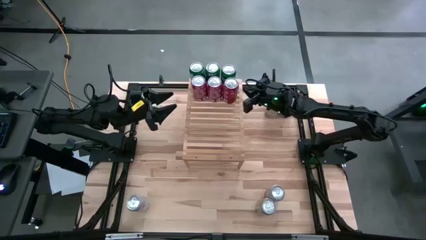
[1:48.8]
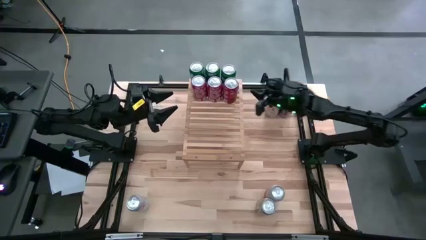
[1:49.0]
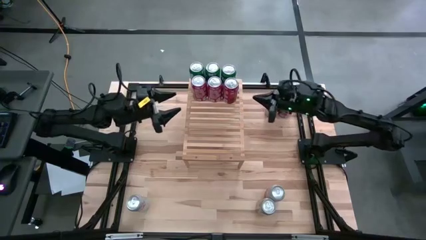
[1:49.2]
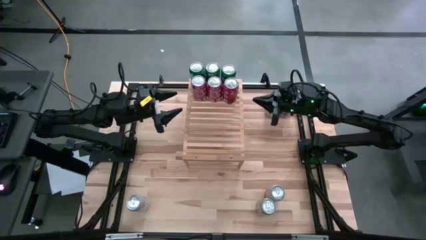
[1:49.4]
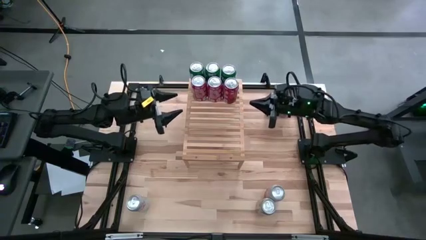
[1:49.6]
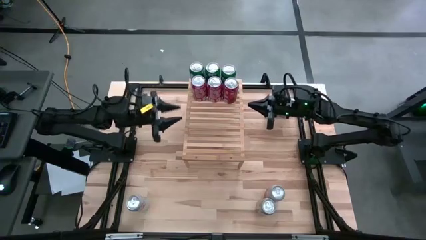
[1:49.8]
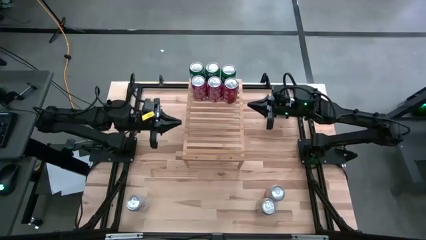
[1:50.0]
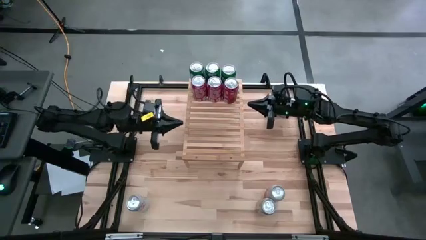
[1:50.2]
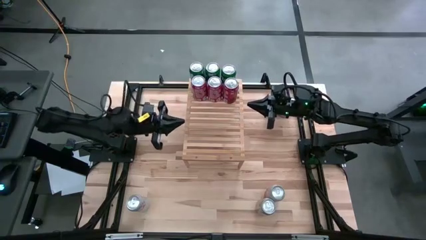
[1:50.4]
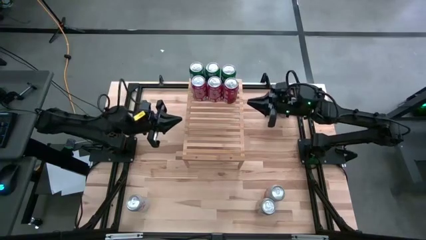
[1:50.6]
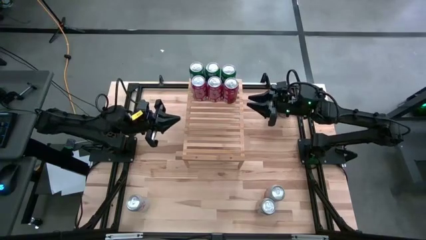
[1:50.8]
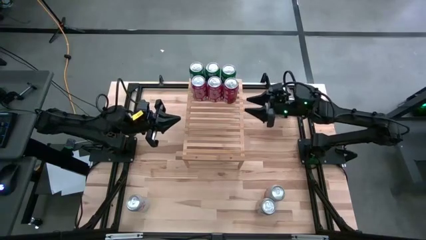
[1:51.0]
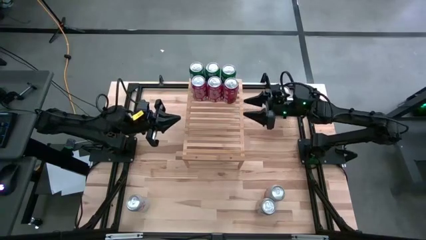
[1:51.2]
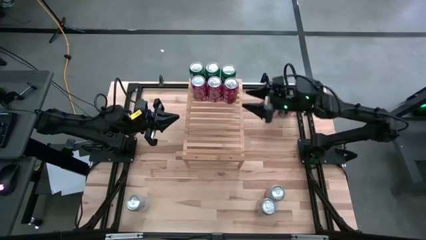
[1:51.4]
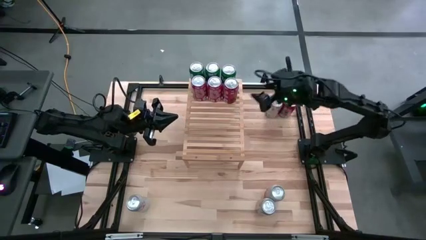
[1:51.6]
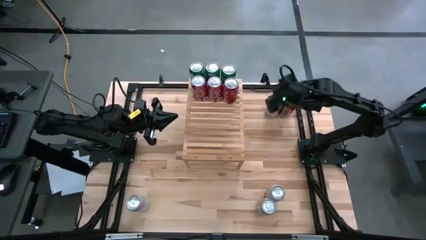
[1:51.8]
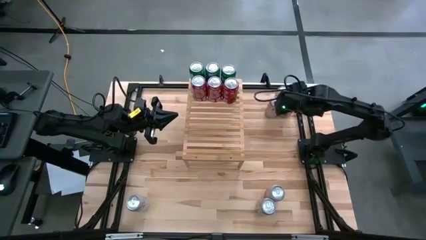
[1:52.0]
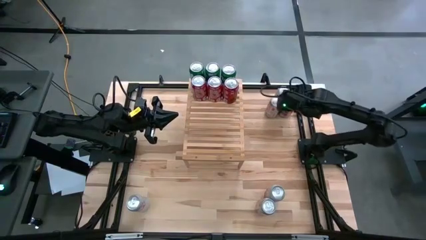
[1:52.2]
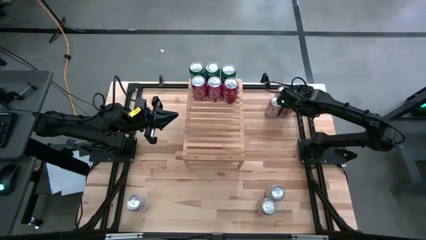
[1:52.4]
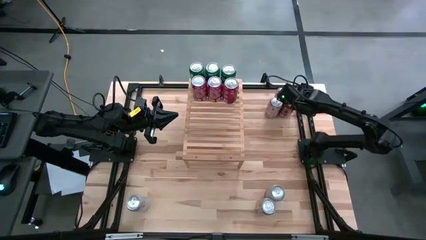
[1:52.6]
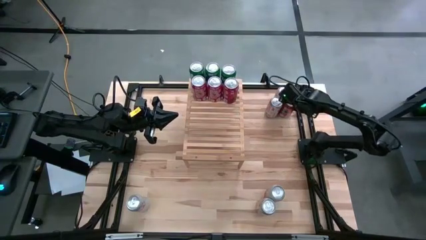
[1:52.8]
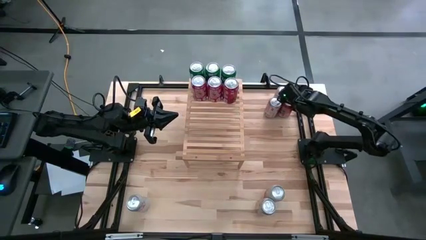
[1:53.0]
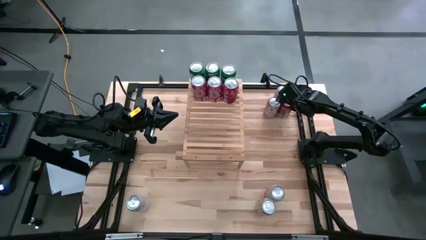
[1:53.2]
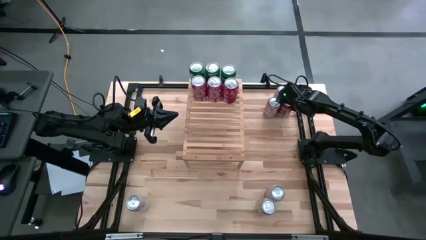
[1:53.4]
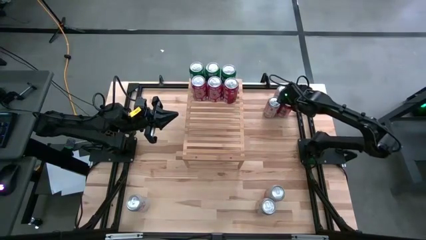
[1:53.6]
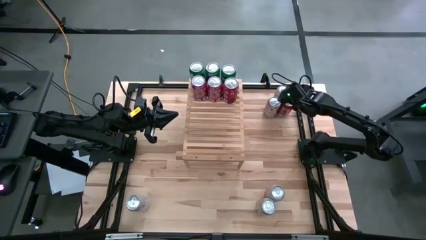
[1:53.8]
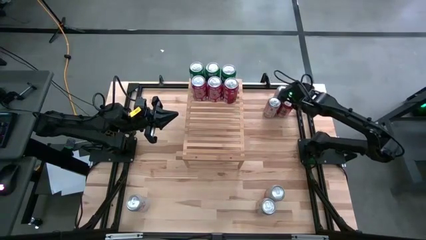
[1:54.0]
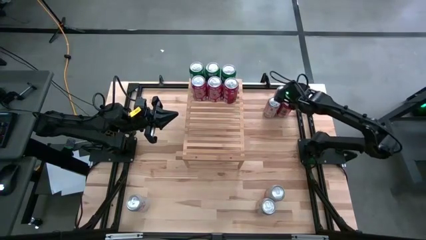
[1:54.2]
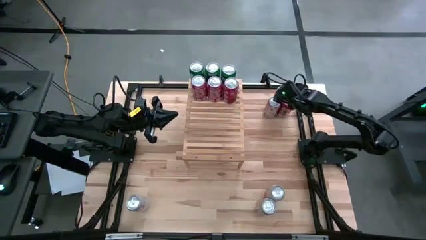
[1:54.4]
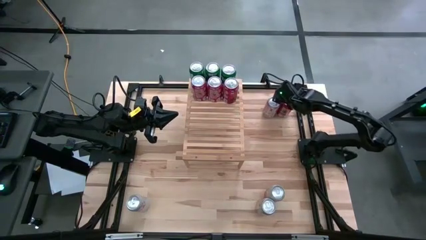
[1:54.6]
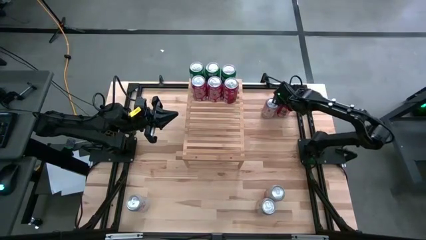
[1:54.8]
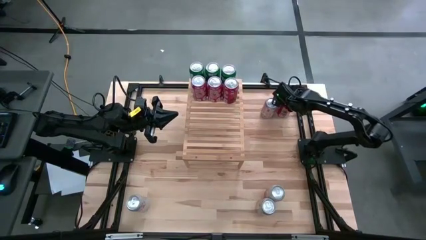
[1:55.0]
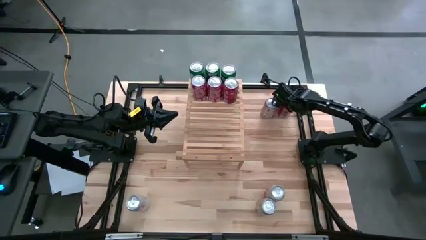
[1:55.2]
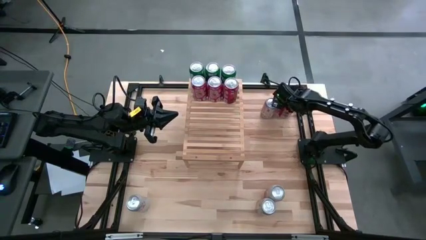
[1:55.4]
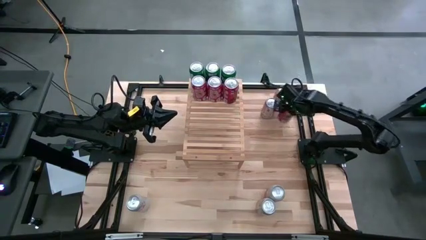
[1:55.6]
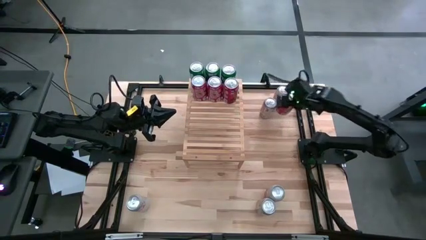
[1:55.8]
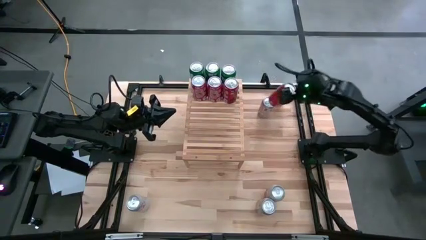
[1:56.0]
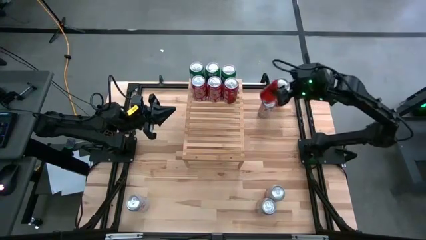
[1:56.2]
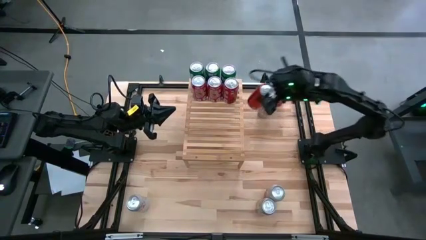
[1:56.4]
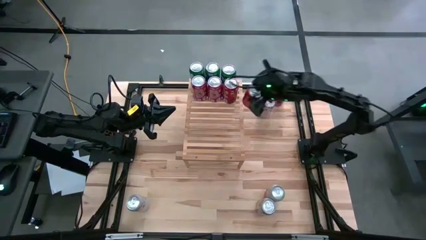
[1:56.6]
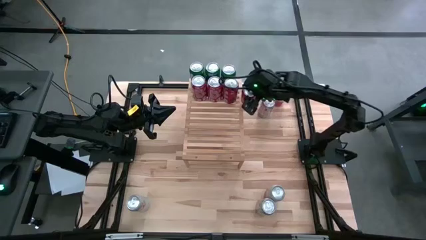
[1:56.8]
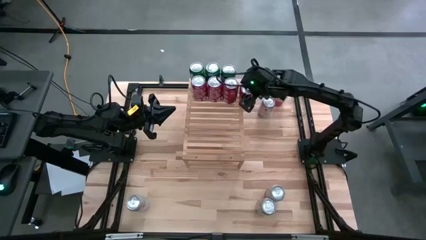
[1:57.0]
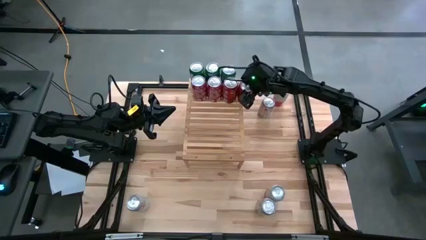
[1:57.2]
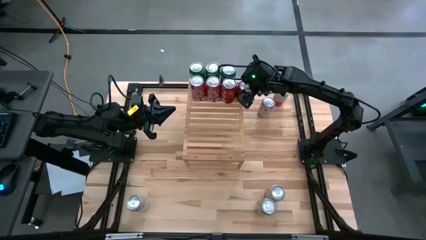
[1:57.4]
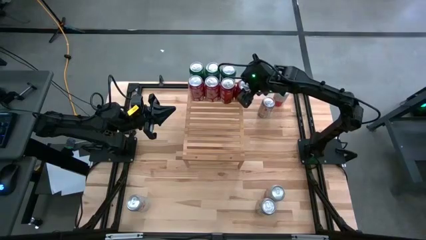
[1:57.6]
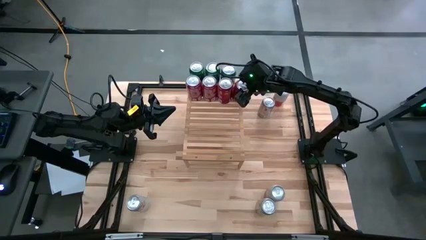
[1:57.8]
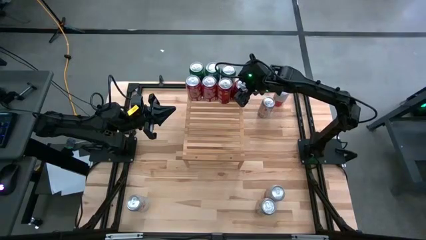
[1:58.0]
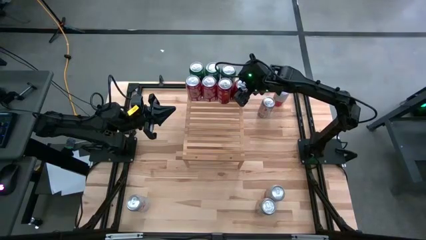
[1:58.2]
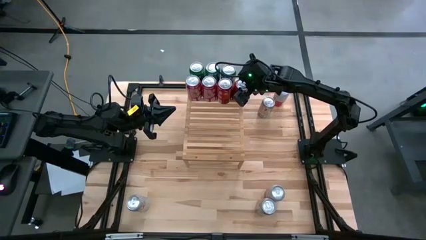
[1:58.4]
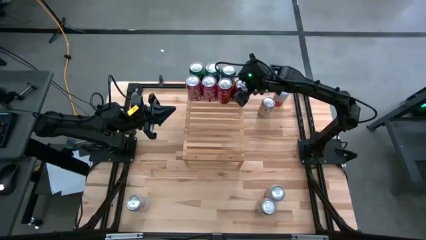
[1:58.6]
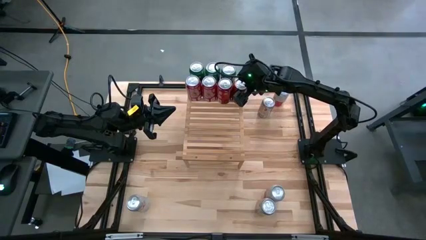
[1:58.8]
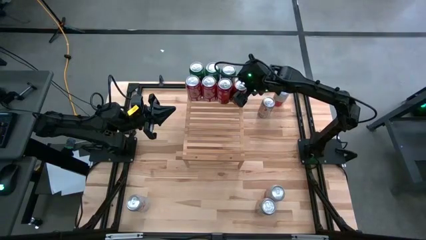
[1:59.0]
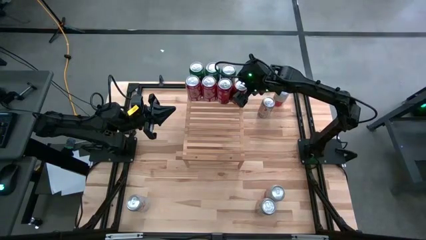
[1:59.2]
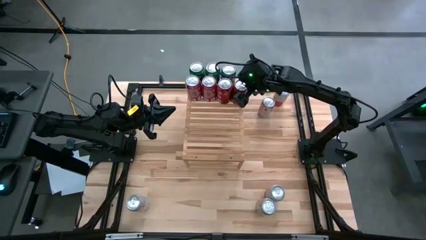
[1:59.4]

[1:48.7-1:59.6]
Task: Place canned beverage on shelf
Put the red soda can on the shelf aligned with the other red soda cans

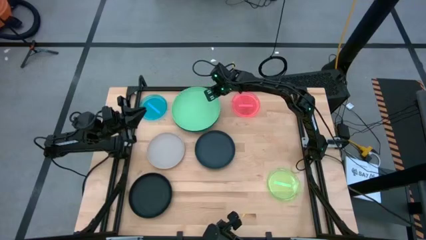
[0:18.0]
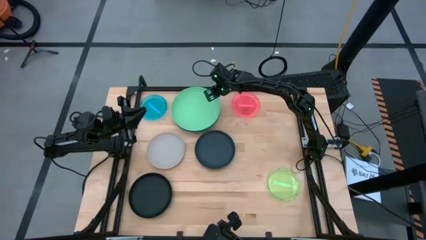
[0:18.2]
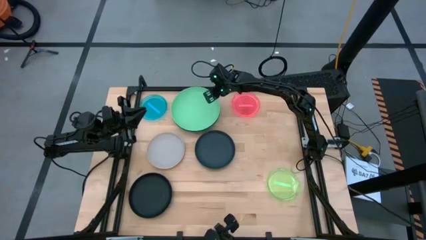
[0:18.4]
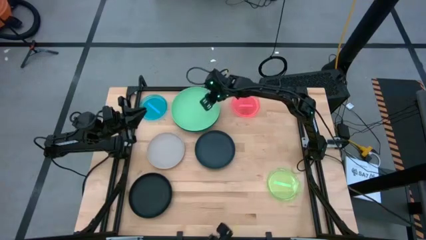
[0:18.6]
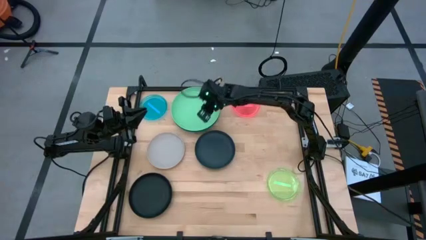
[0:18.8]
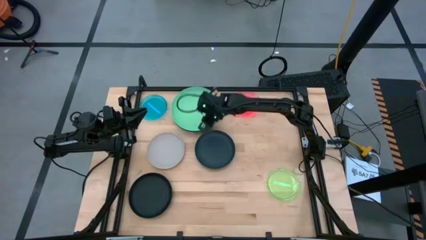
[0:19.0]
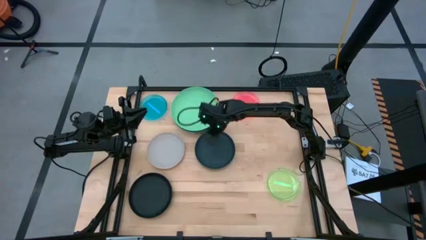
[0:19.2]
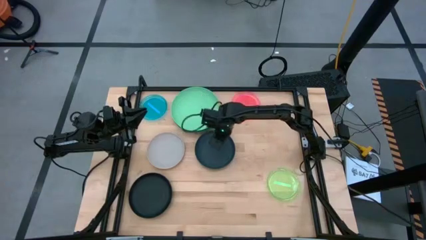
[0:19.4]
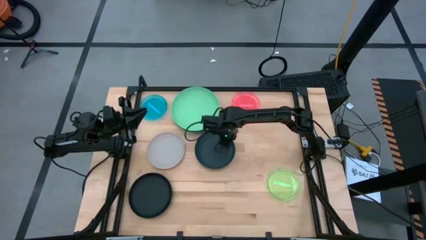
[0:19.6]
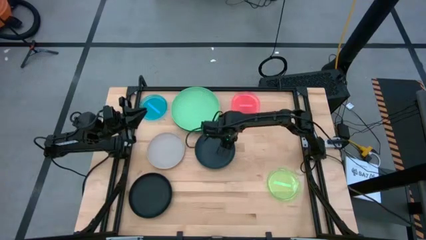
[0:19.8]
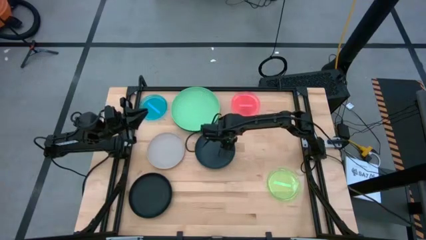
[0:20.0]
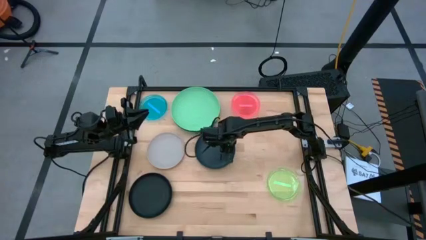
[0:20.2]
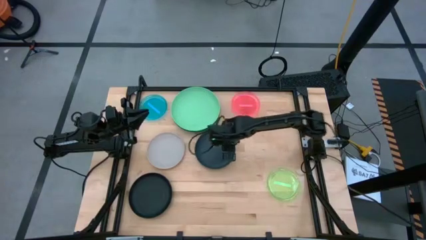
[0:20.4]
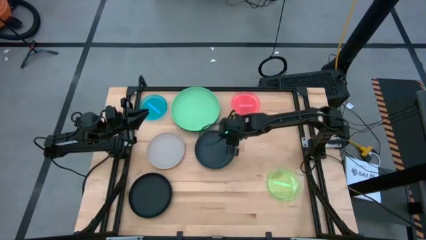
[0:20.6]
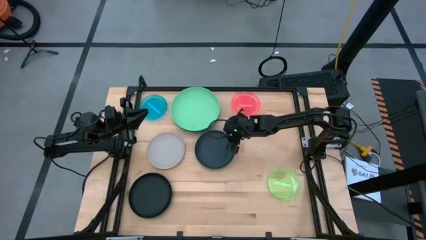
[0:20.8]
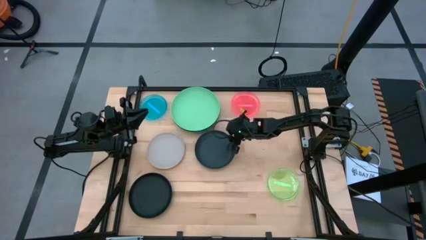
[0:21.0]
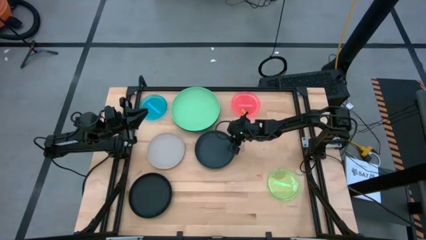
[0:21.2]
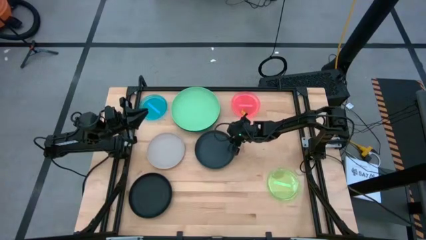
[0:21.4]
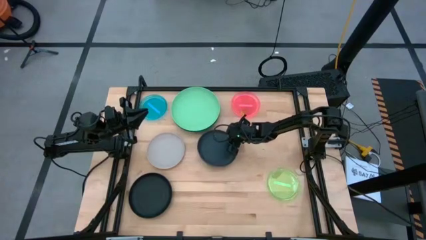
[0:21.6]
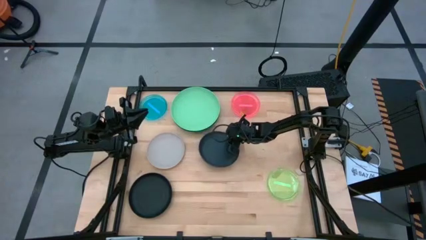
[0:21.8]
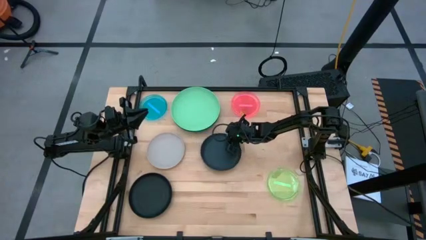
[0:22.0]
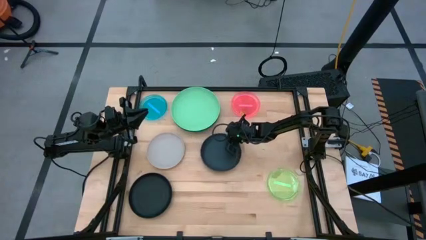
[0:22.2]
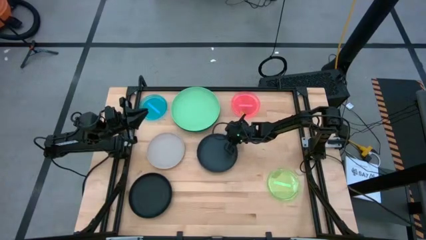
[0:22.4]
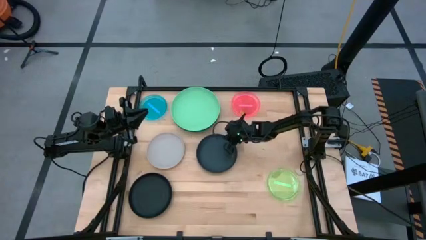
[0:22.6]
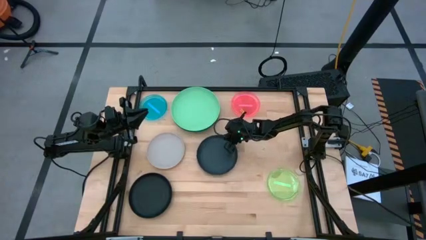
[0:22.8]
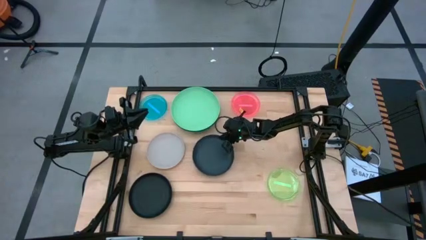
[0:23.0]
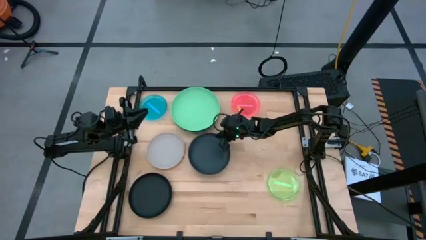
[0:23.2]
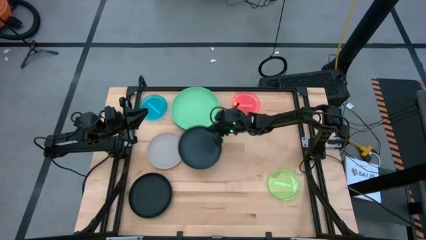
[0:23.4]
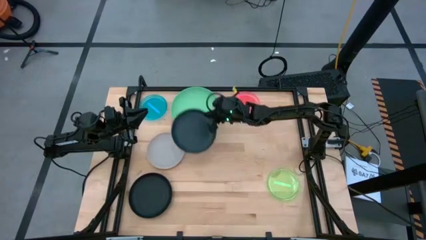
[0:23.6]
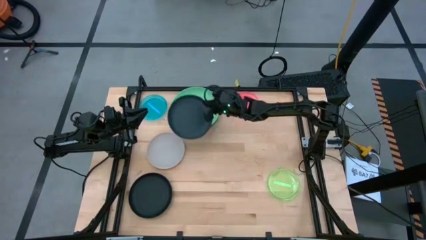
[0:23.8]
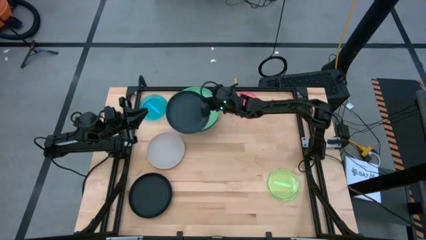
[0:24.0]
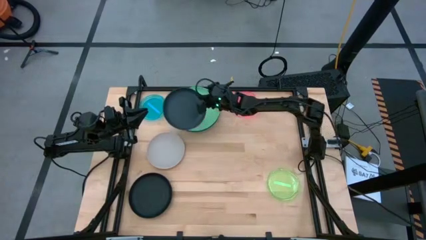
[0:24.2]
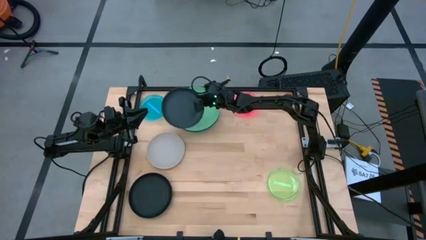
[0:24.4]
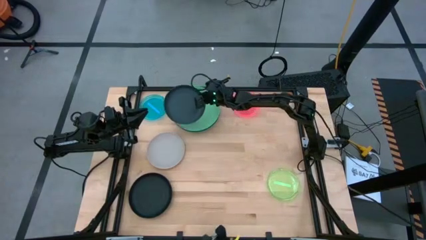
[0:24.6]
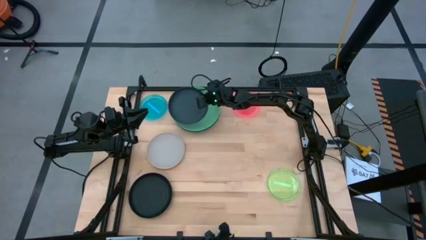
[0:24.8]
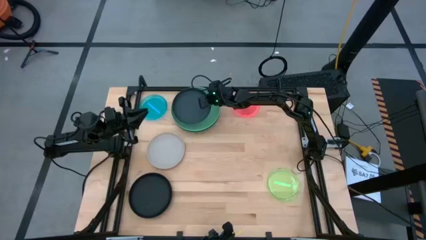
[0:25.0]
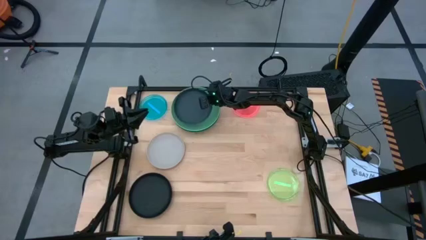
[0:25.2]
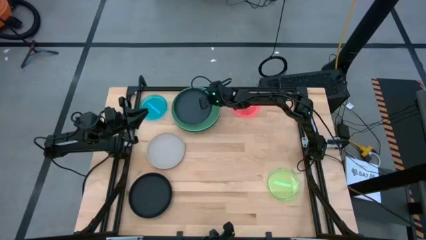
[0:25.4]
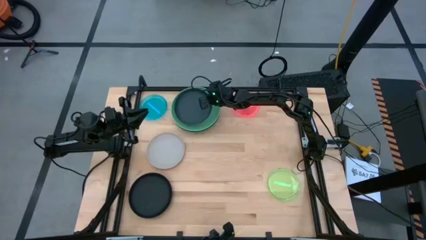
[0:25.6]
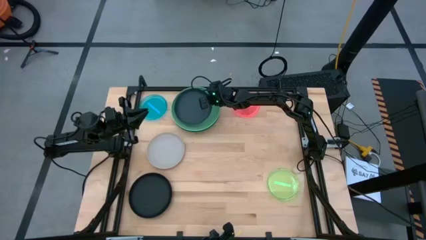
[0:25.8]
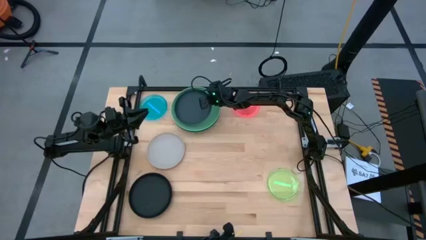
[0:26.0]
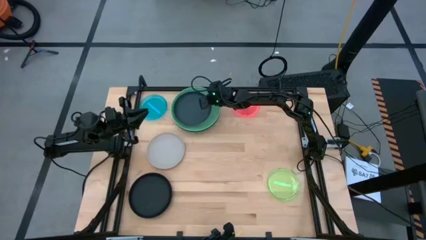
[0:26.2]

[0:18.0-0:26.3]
Task: Stack plastic plates
Stack the top dark plate on the light green plate
